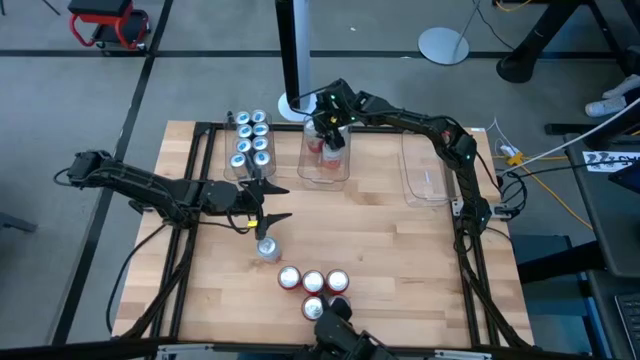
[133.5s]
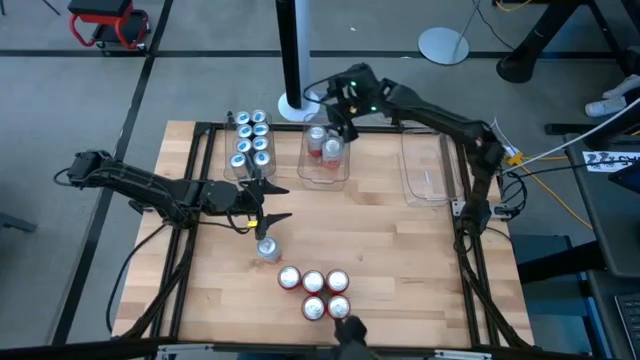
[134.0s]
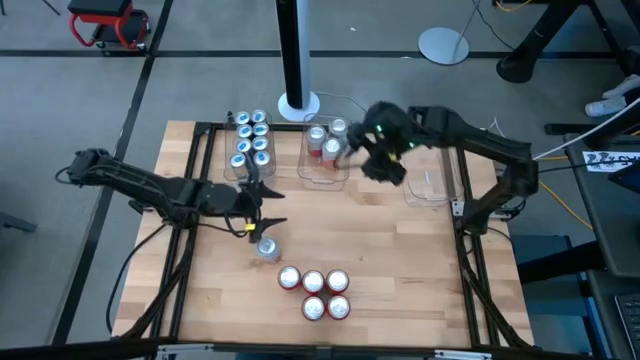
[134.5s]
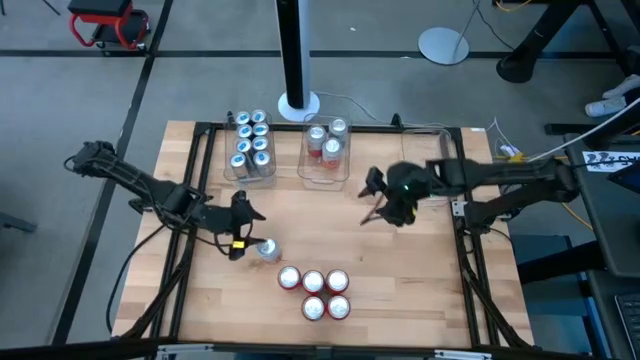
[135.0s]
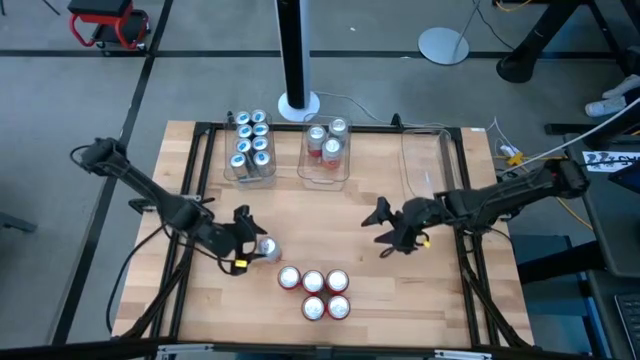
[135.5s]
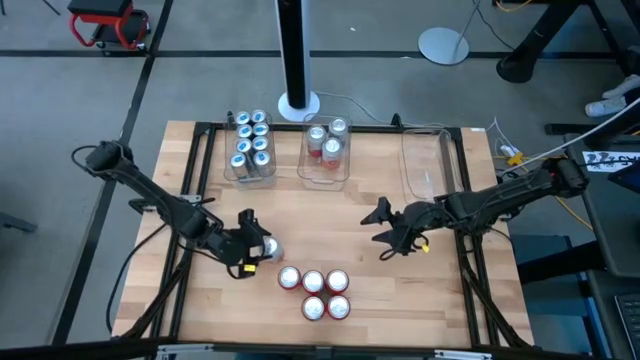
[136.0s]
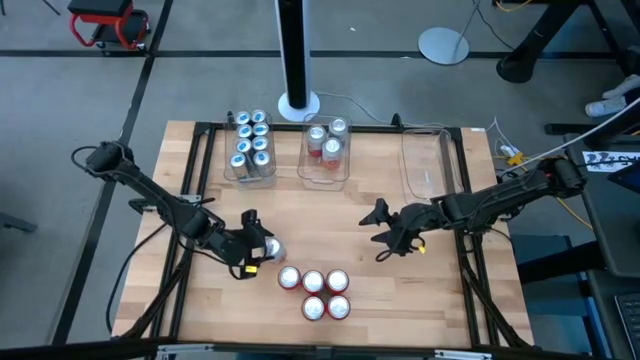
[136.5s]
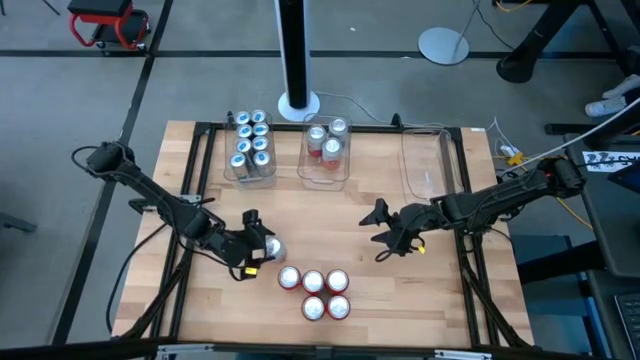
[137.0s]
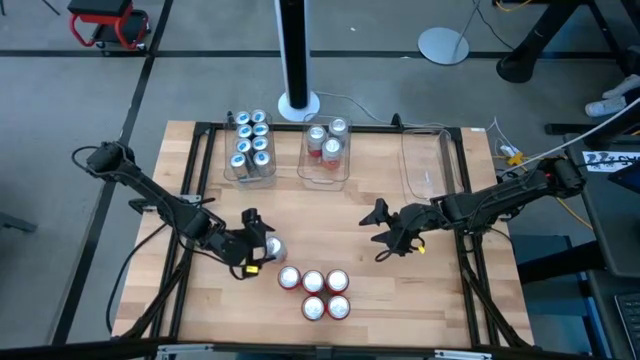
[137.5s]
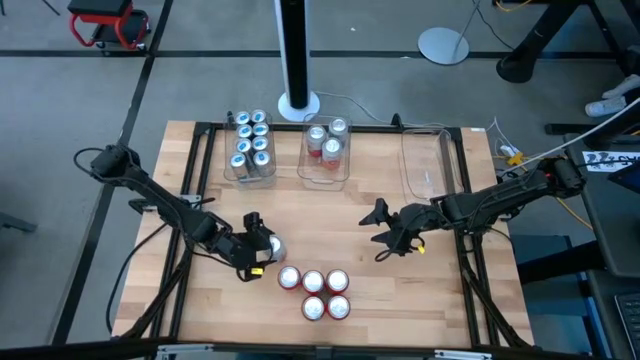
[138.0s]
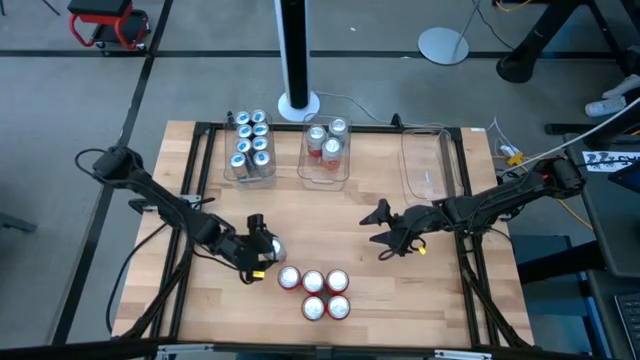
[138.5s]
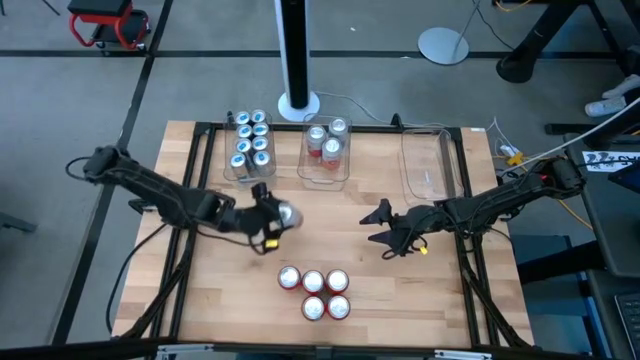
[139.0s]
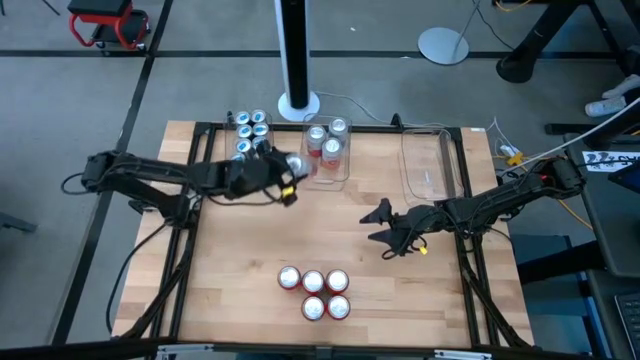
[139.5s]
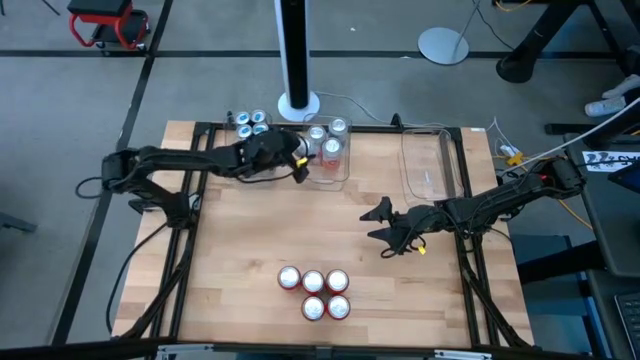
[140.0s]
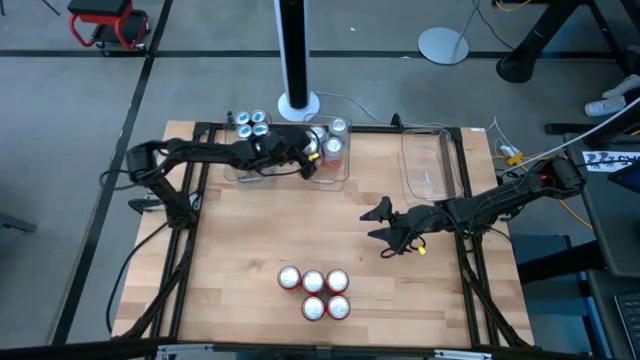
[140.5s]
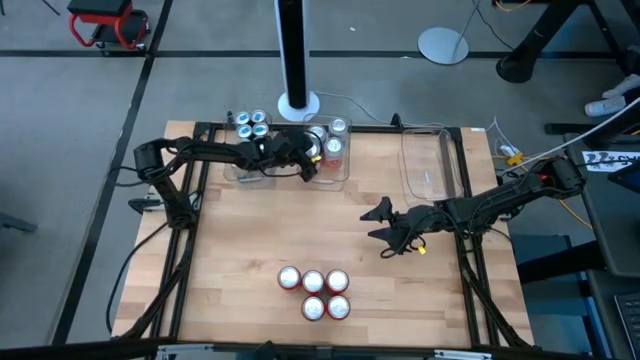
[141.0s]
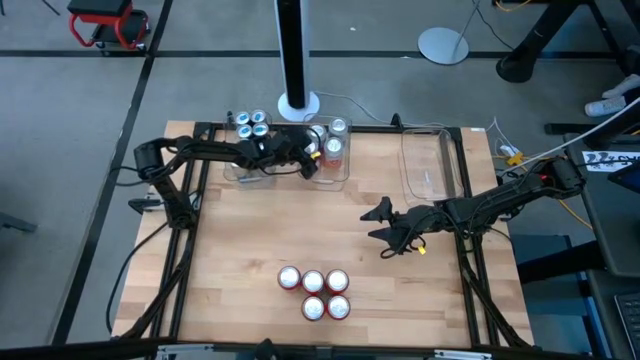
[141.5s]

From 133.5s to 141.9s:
Task: Sort soda cans
Put the pink-white soda can into the middle transparent bin

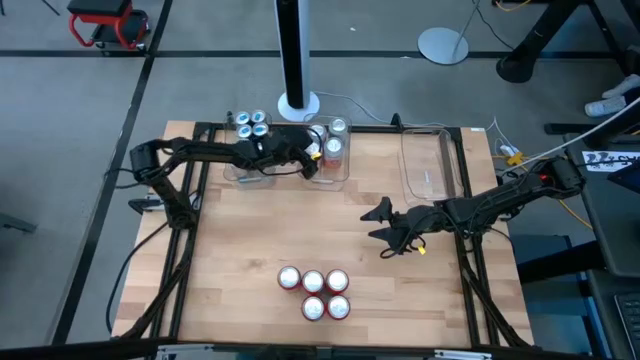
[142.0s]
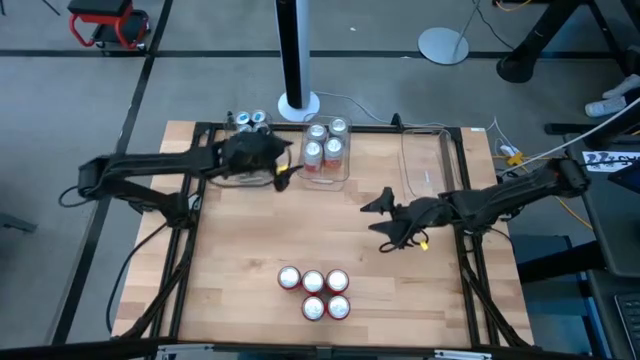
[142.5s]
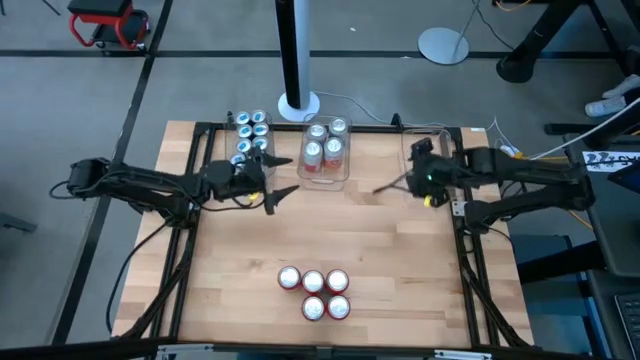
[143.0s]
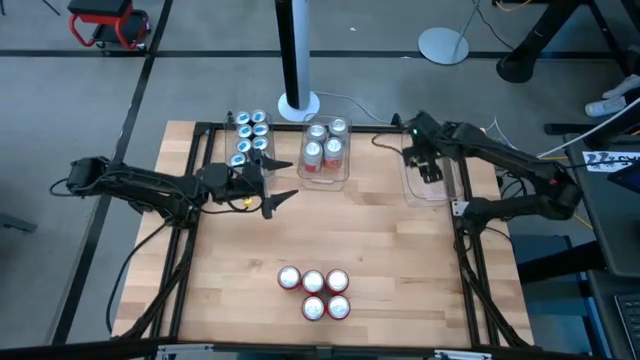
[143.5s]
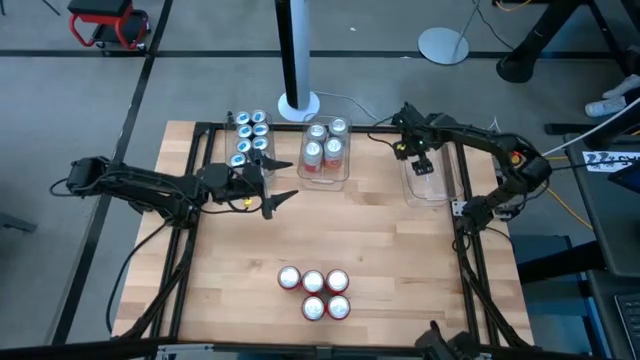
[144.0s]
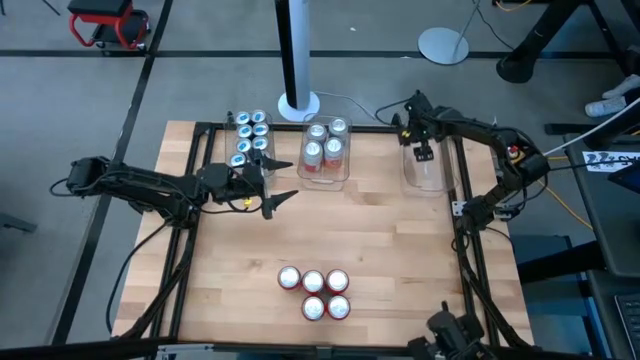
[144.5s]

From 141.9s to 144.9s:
Adjust the right transparent bin on the table

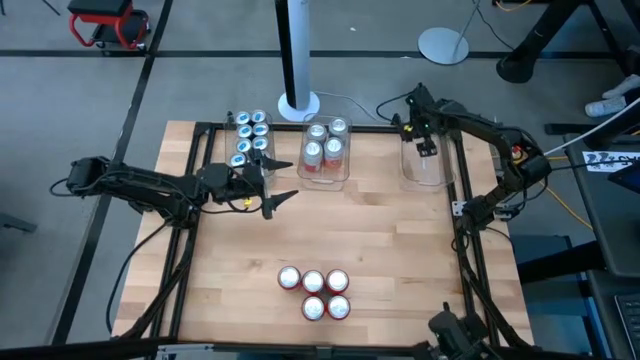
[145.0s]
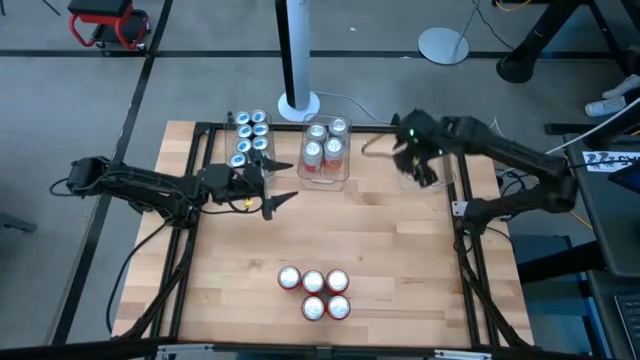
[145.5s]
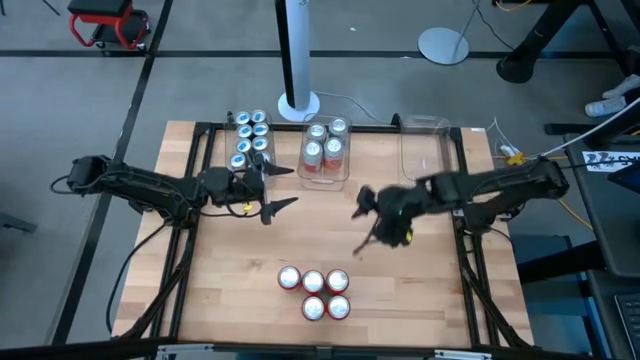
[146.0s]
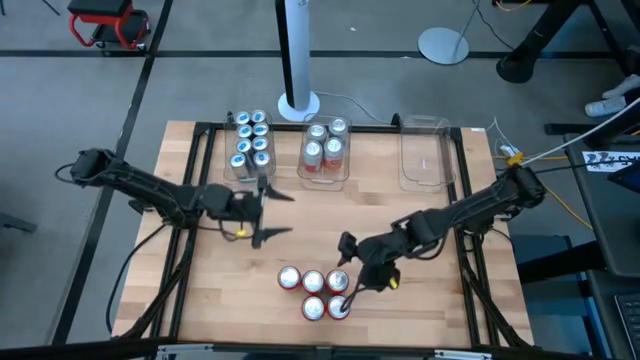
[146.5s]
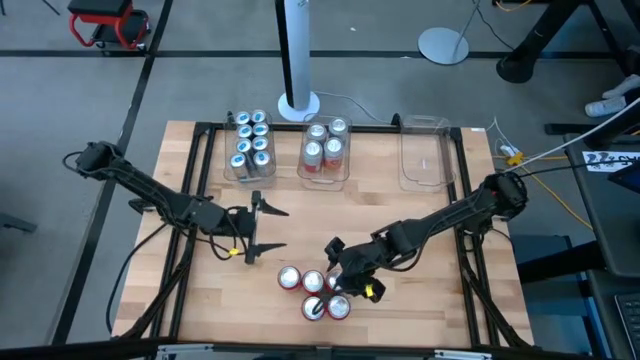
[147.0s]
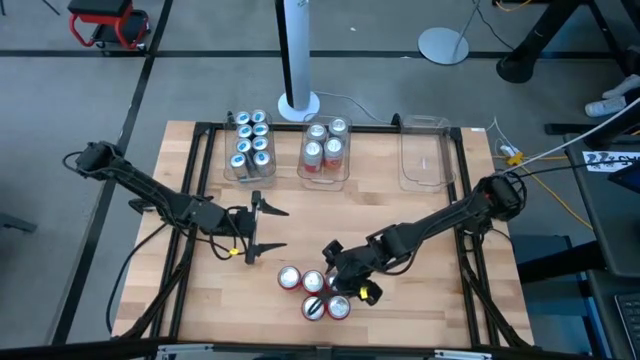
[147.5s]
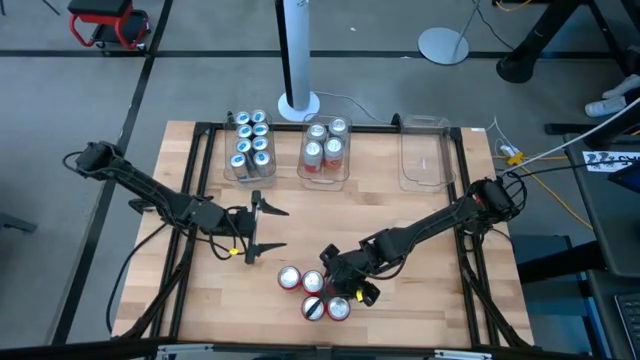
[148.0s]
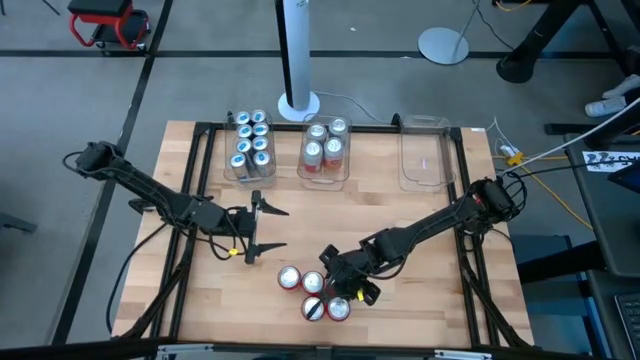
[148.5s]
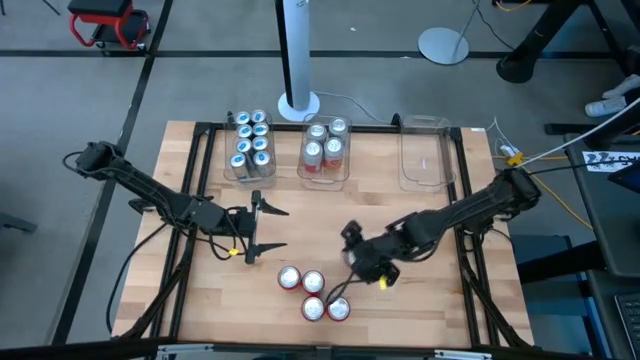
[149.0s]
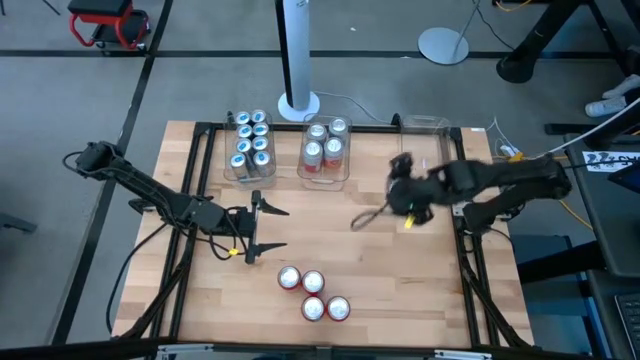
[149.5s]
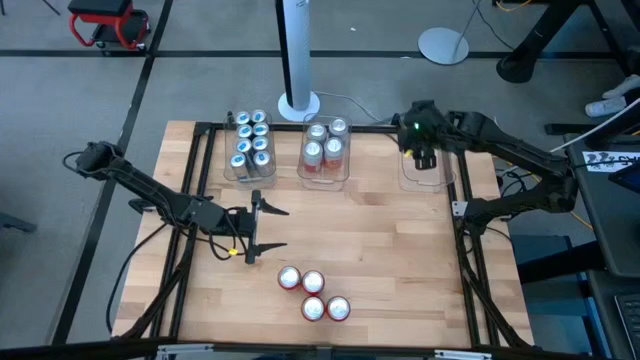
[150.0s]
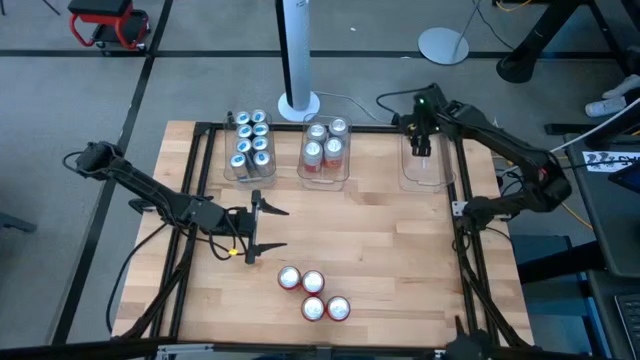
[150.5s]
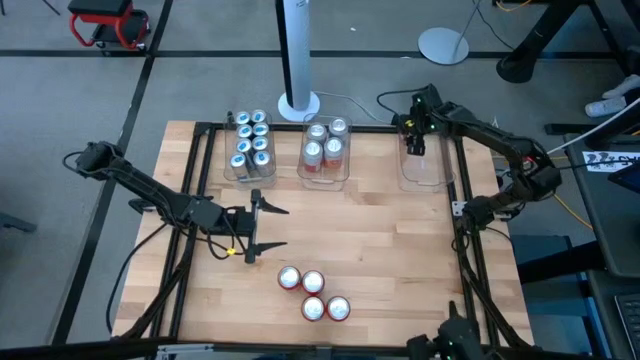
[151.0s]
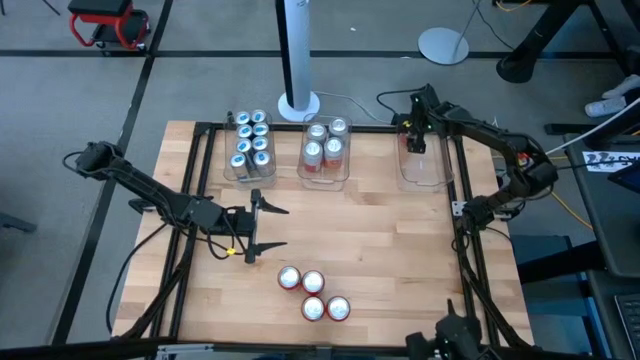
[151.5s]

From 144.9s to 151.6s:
Put the red soda can into the right transparent bin

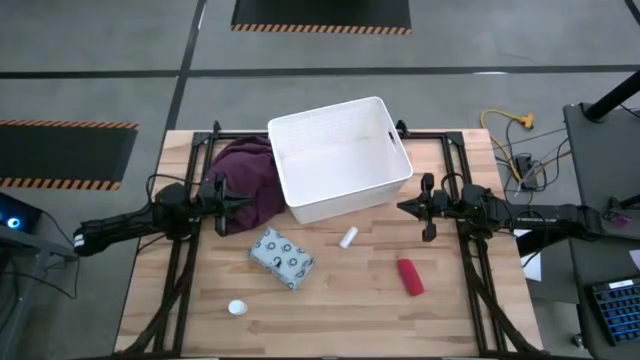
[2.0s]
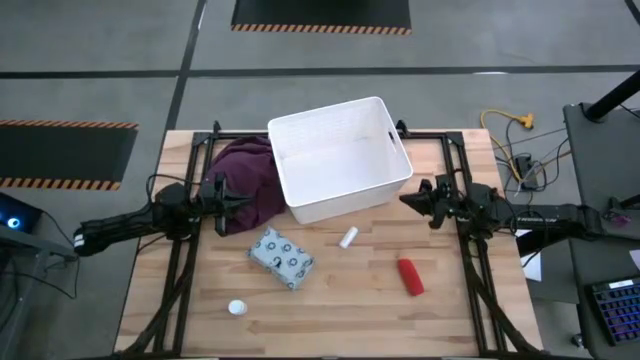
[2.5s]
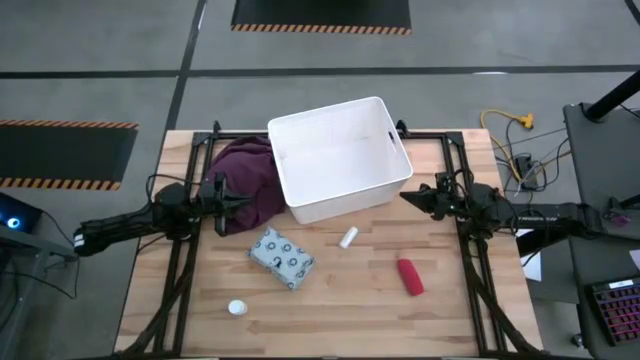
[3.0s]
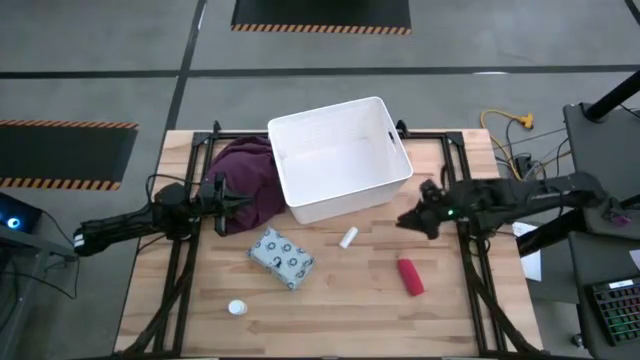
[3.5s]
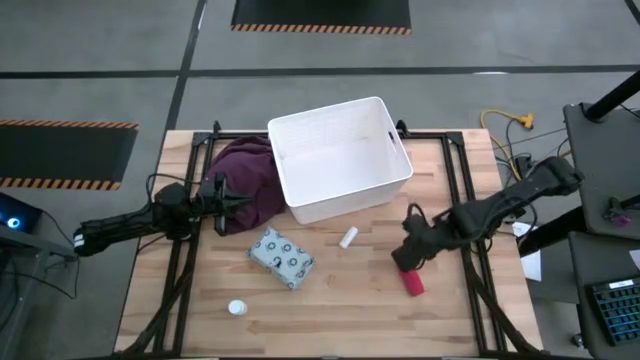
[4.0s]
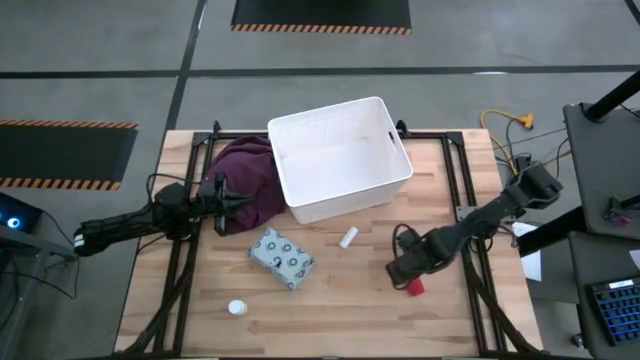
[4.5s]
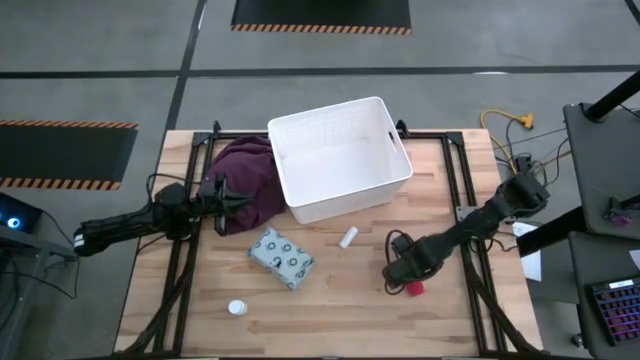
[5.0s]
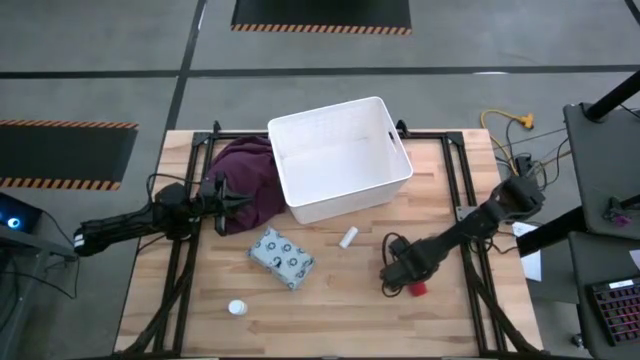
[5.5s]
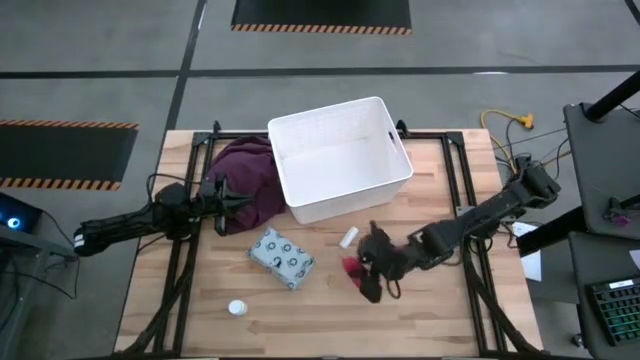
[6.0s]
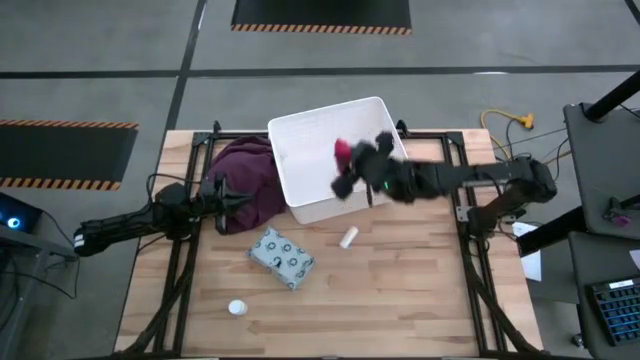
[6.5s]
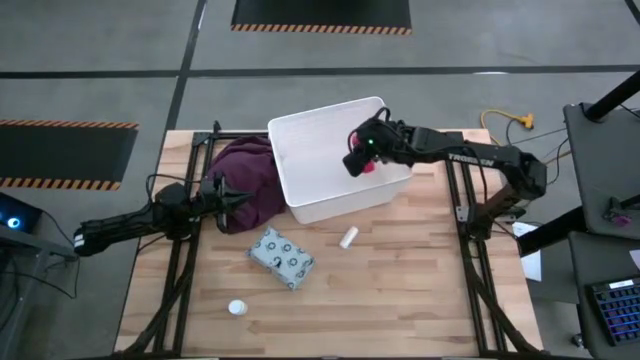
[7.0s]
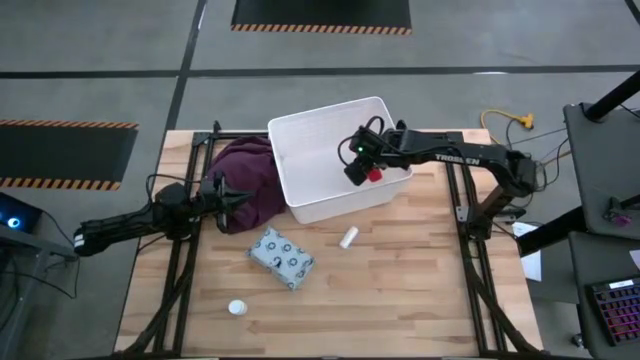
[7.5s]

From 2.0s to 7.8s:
Task: Pick & place medical supplies in basket/bin
Put the red bandage into the white bin
